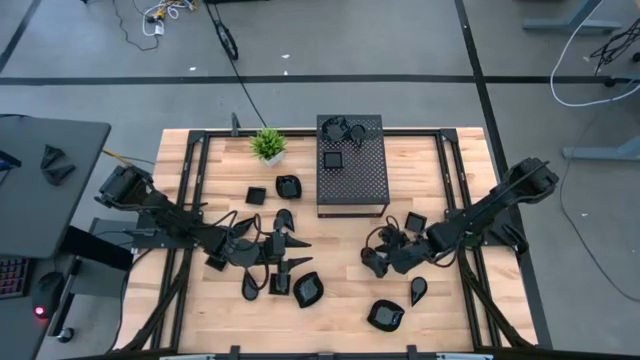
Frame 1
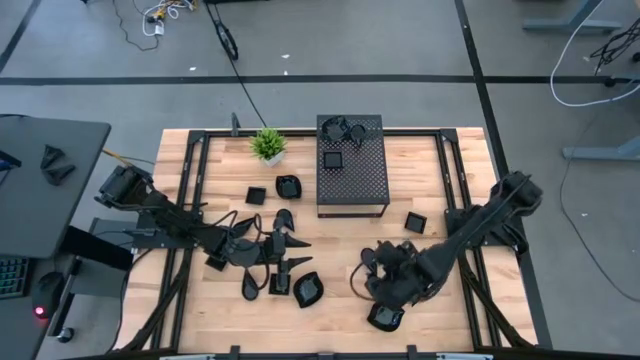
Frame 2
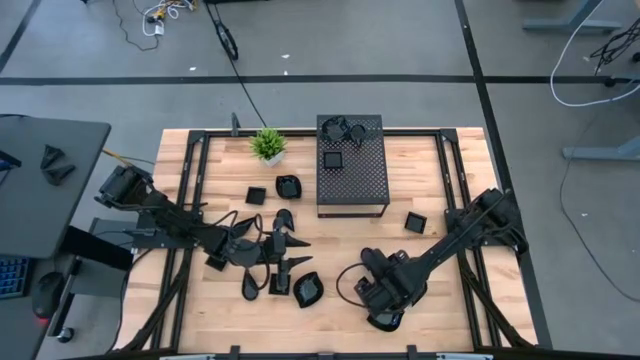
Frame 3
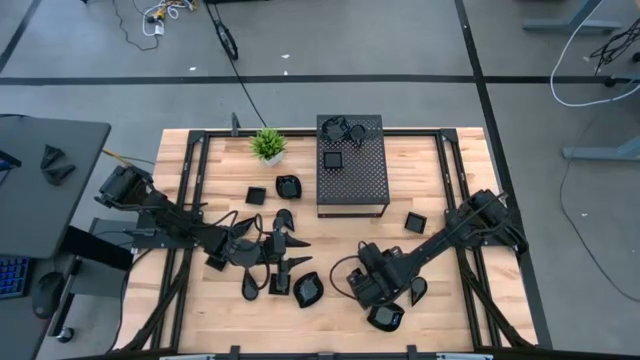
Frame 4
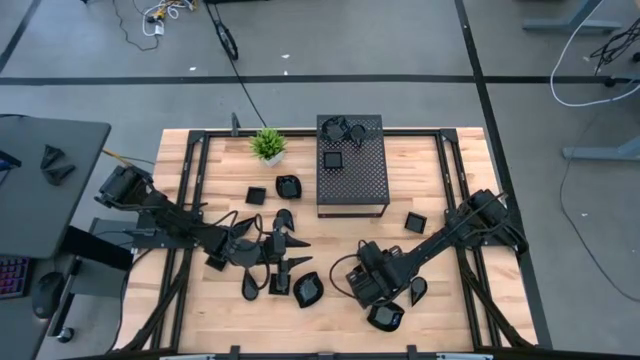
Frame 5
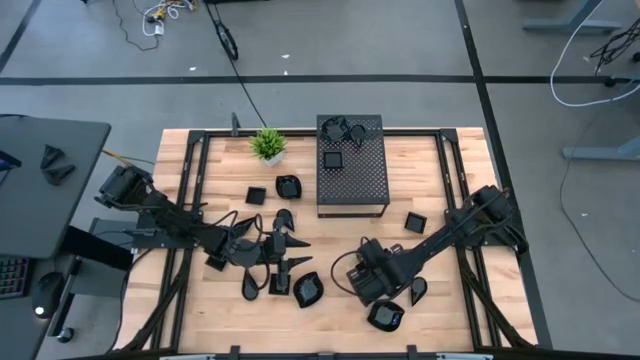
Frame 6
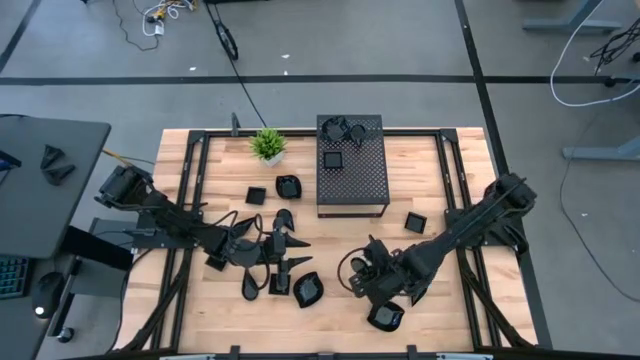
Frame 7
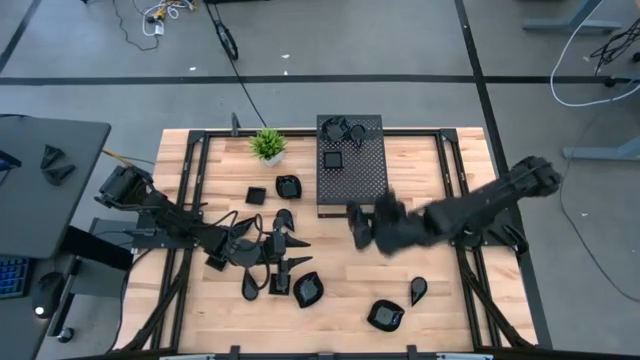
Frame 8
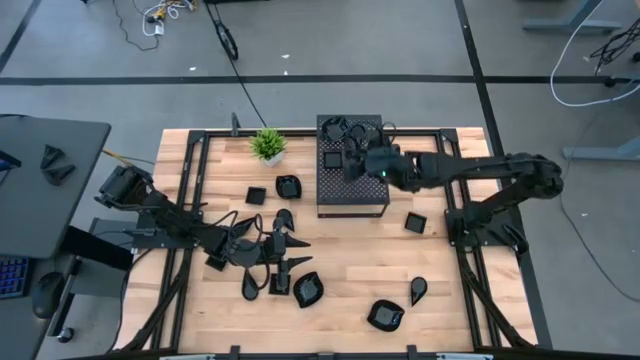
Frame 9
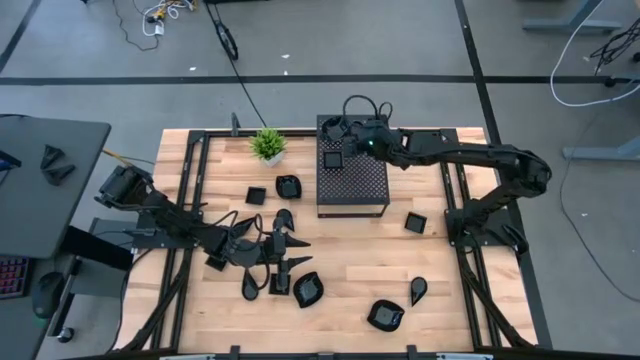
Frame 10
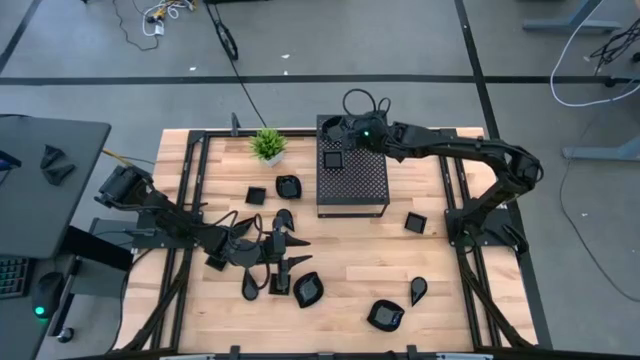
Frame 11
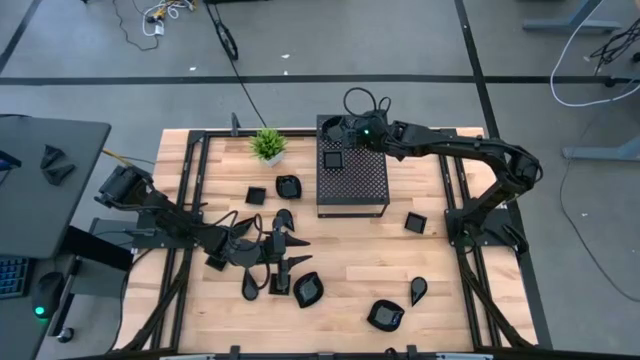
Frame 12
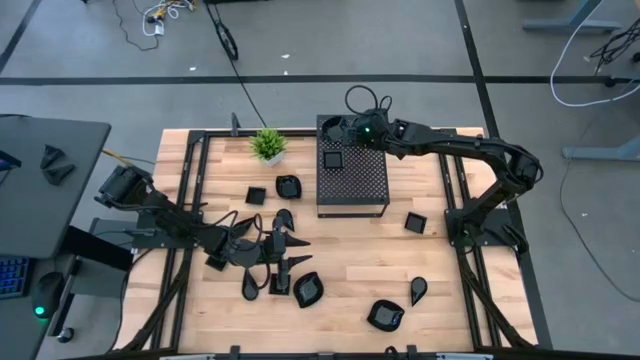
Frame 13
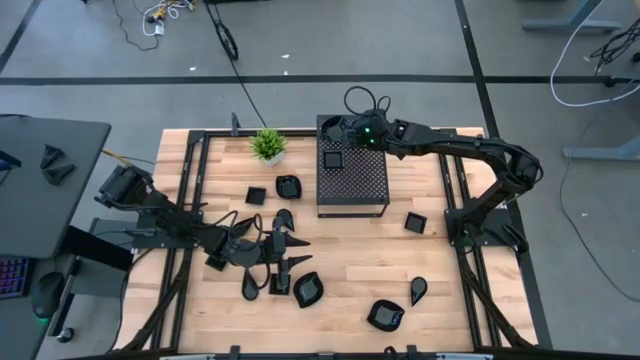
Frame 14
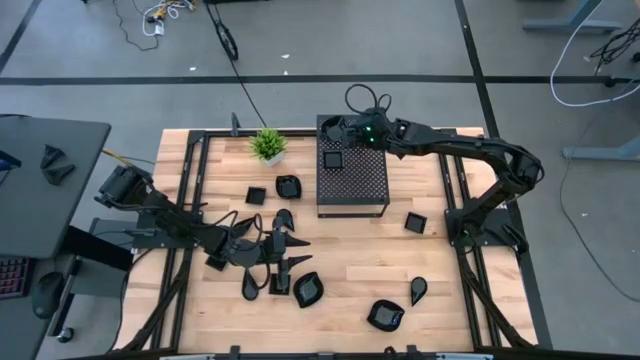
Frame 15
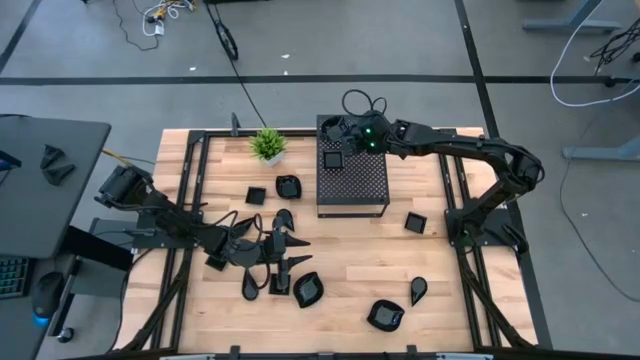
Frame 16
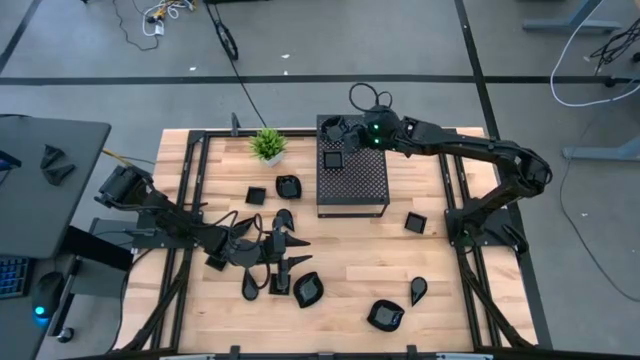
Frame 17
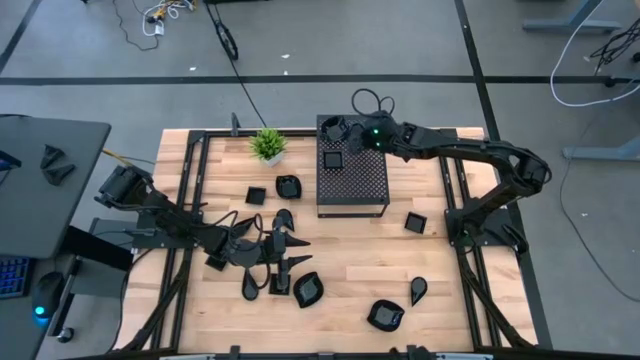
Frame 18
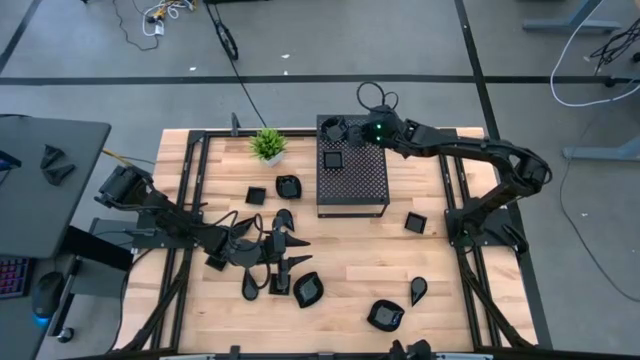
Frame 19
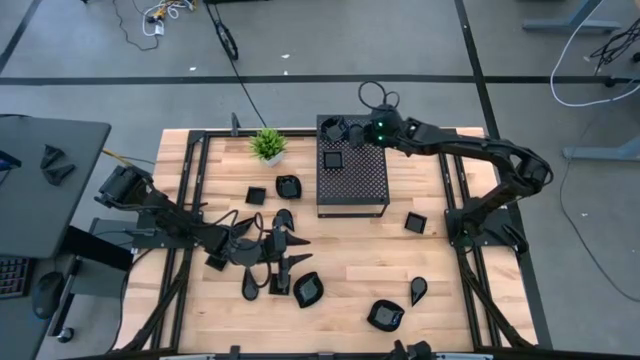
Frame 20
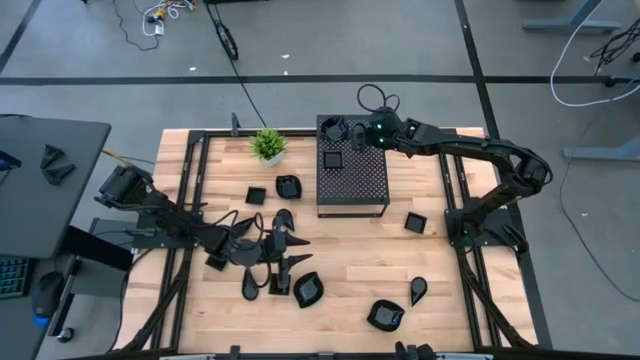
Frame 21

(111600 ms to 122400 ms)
Task: Pick & Place Mini shaped plates
Stack the drop shaped plate on top of the drop shaped plates on the shelf

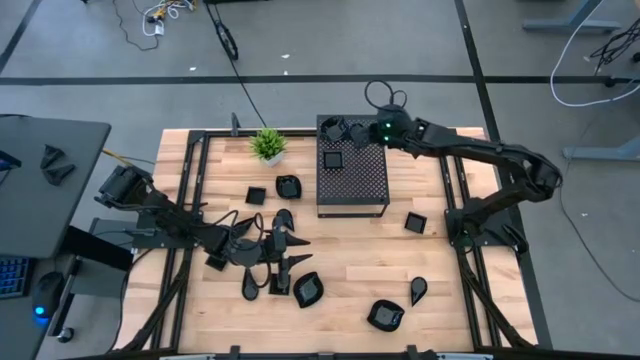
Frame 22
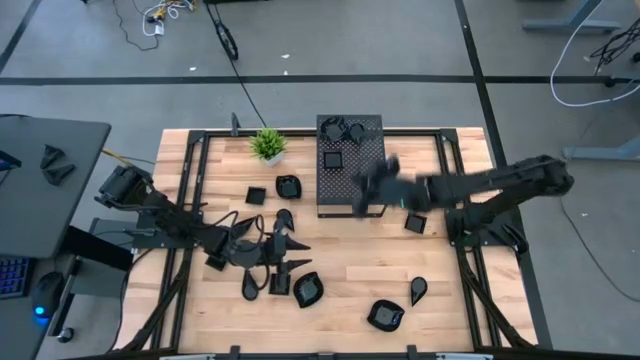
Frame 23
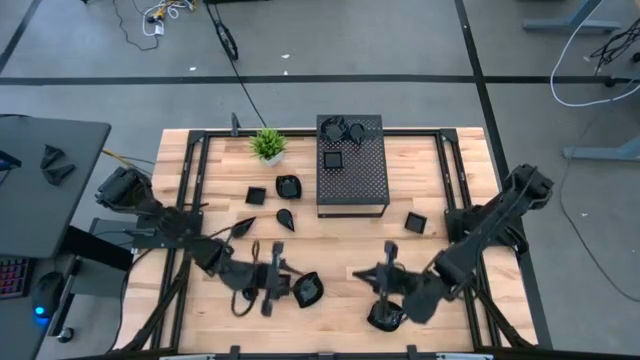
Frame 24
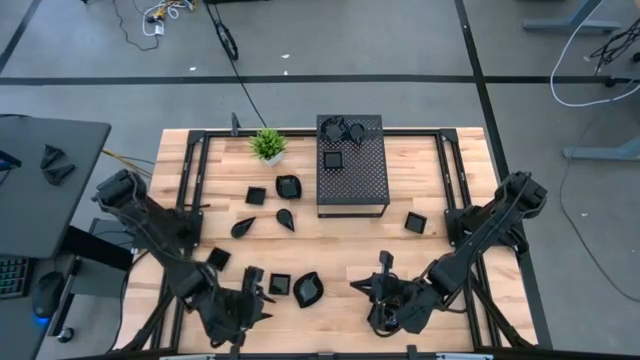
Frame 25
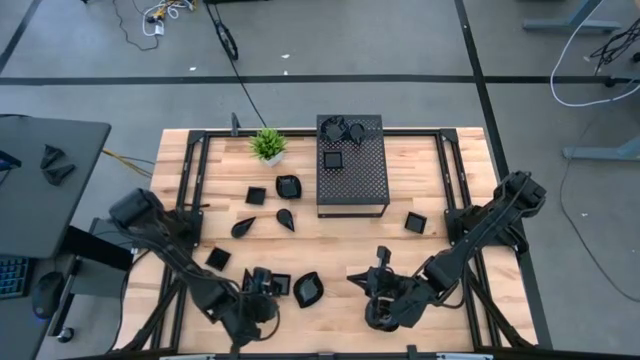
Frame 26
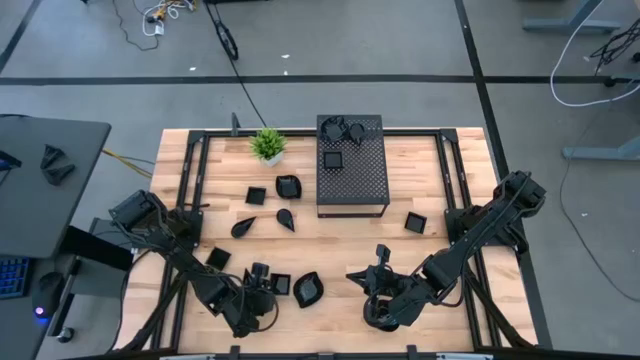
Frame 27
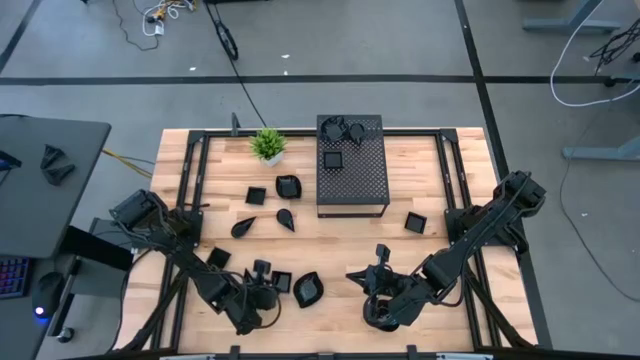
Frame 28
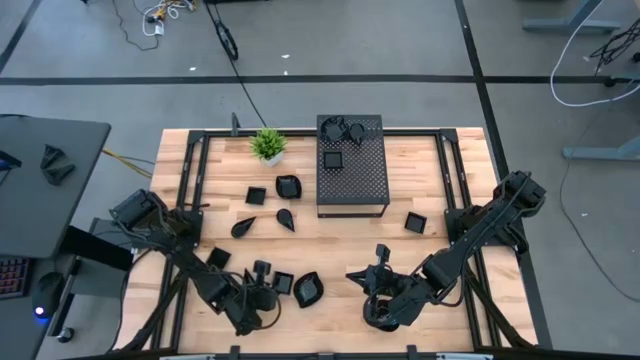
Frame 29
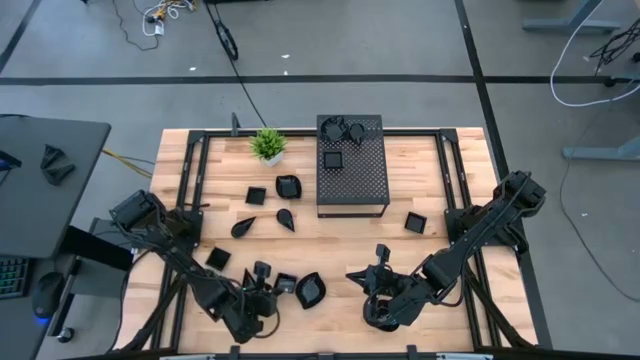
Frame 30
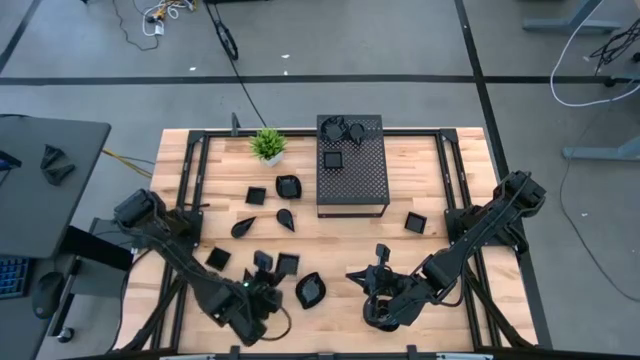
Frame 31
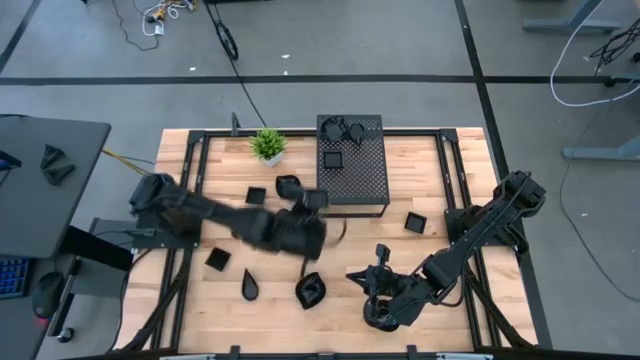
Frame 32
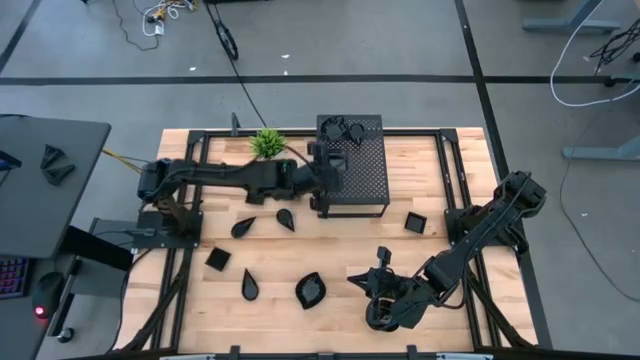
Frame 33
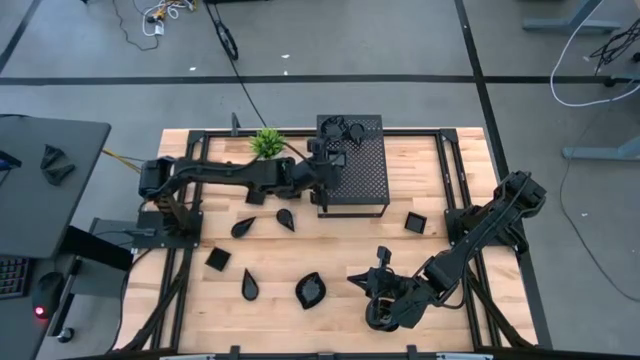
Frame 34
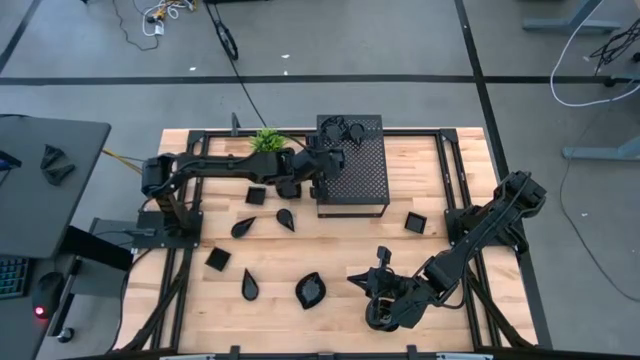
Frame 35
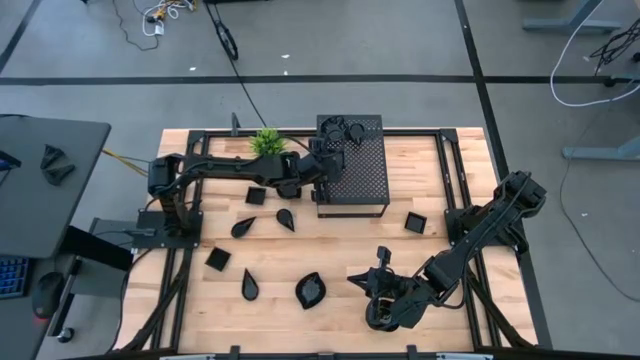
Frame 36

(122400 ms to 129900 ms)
Stack the square plate on top of the square plates on the shelf

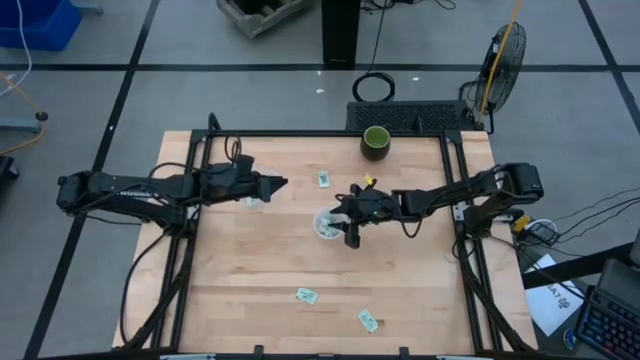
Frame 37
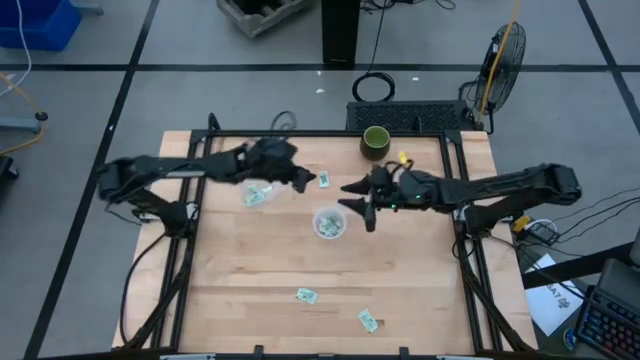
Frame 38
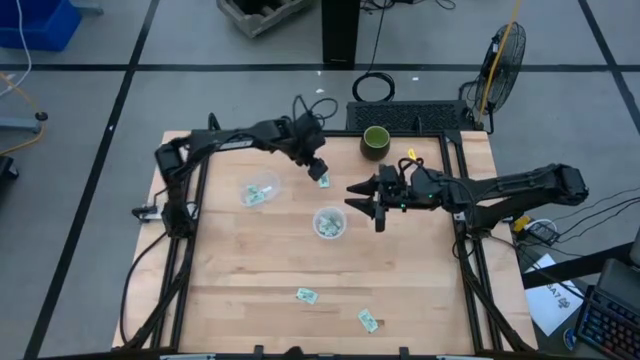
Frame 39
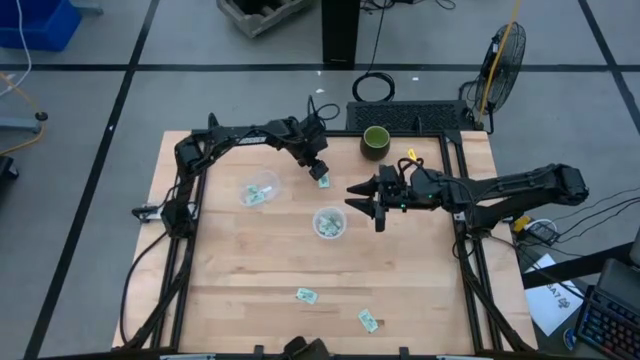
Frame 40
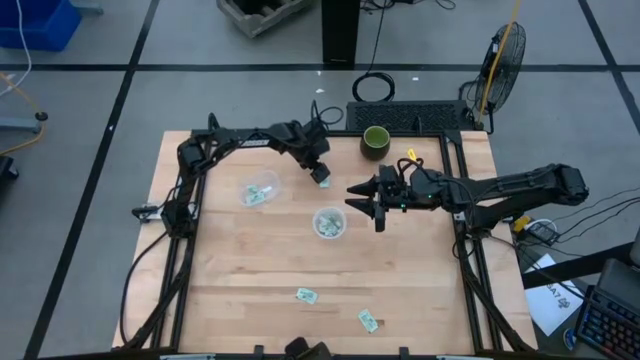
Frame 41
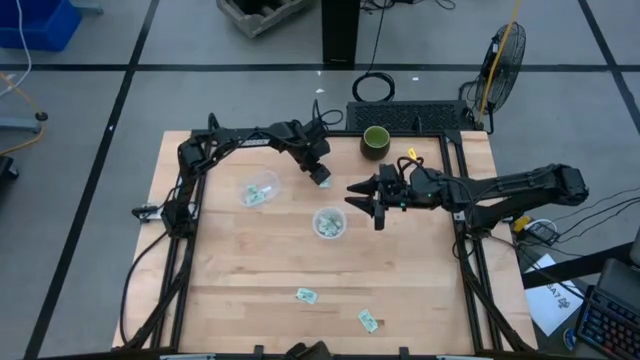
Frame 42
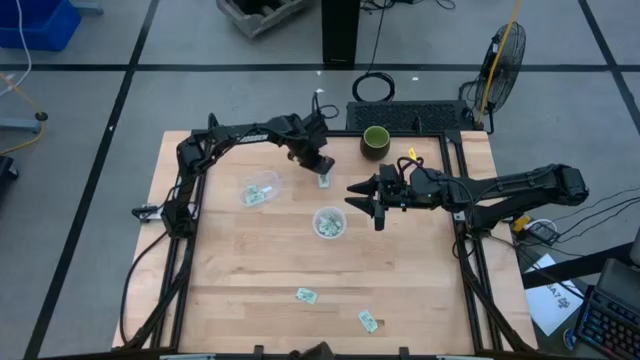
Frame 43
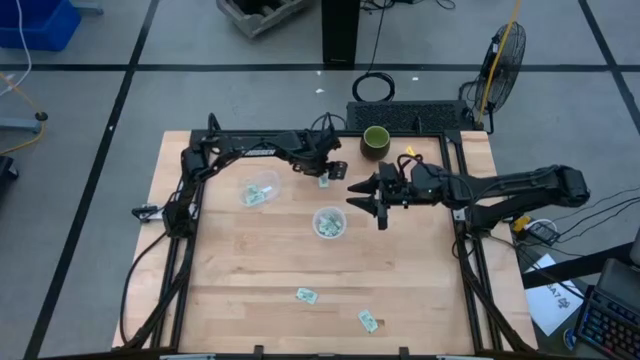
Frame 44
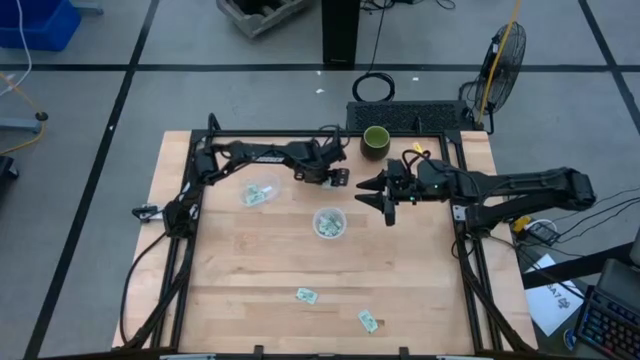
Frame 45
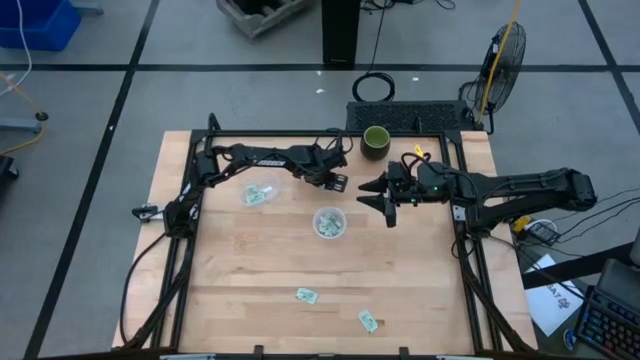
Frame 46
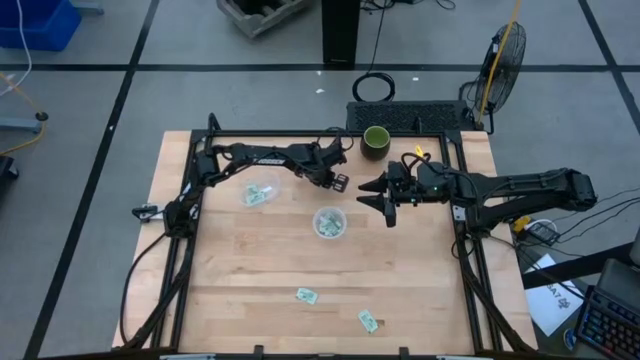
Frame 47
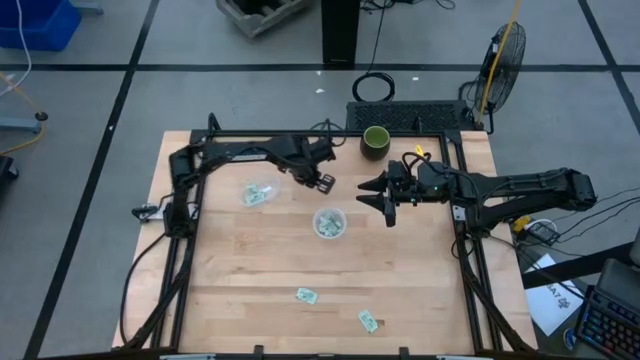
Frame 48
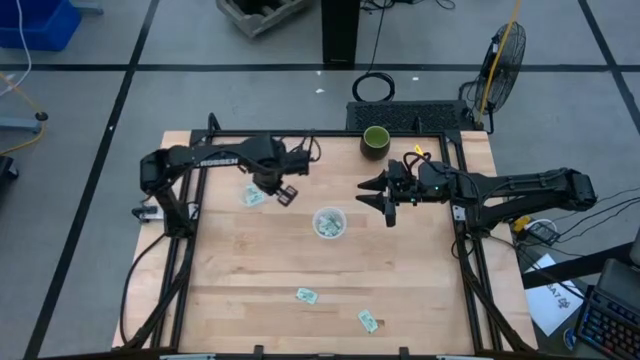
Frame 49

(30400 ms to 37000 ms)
Task: Pick and place items into bin
Put the stevia packet into the left transparent bin
